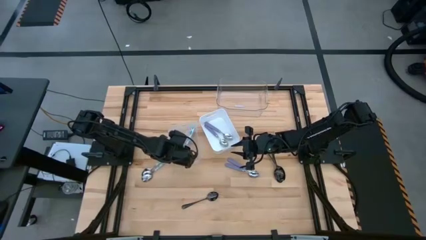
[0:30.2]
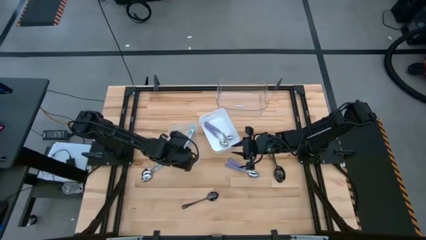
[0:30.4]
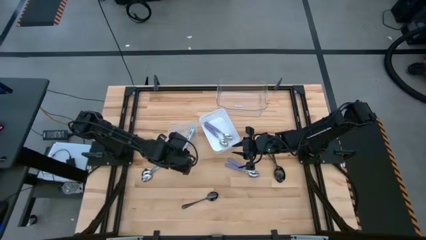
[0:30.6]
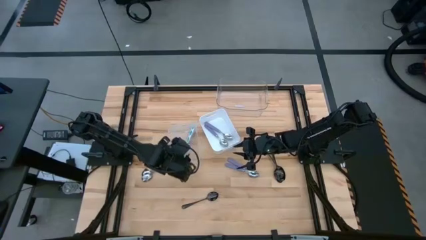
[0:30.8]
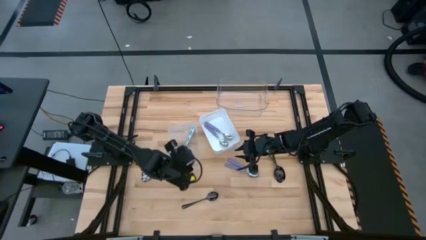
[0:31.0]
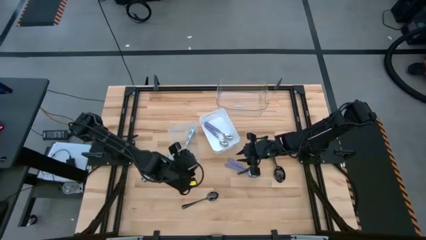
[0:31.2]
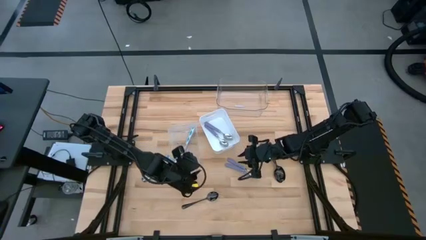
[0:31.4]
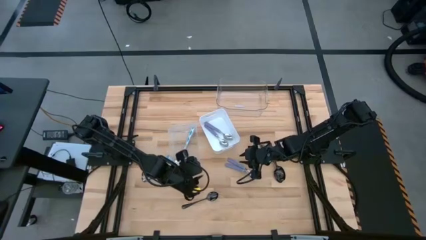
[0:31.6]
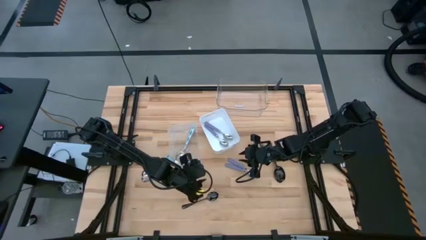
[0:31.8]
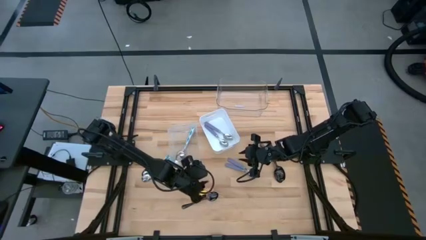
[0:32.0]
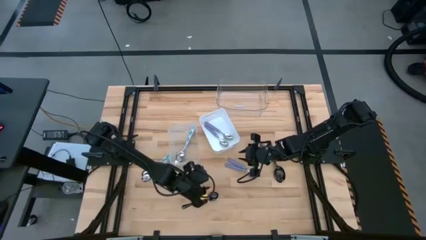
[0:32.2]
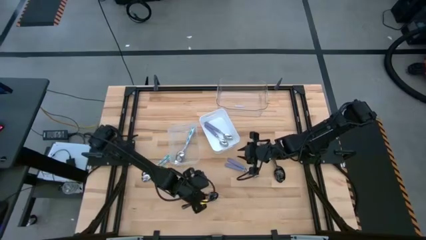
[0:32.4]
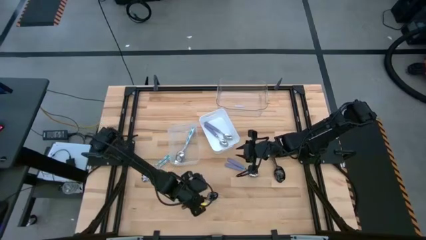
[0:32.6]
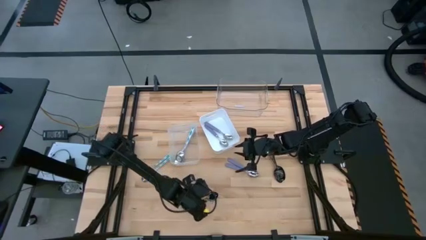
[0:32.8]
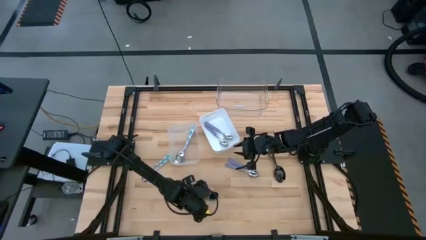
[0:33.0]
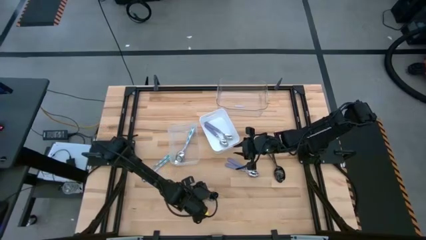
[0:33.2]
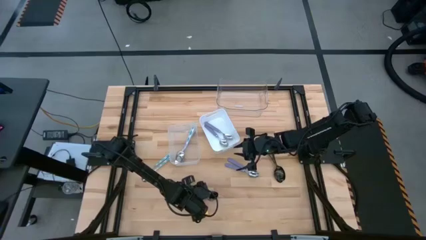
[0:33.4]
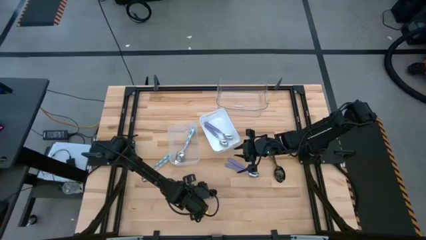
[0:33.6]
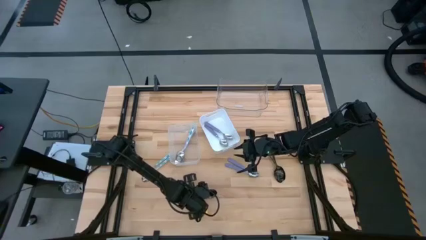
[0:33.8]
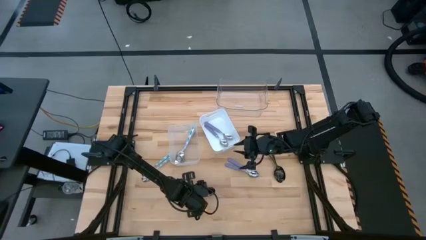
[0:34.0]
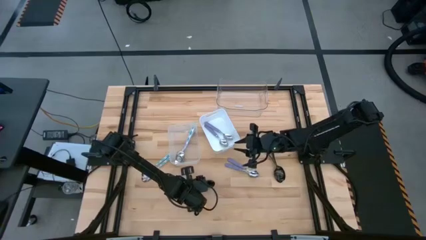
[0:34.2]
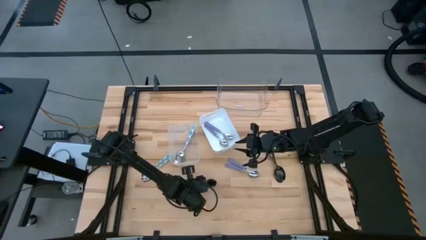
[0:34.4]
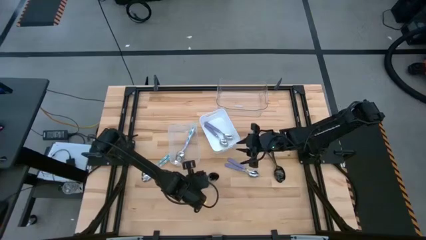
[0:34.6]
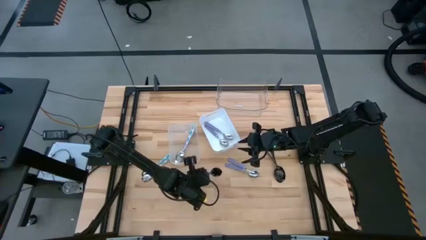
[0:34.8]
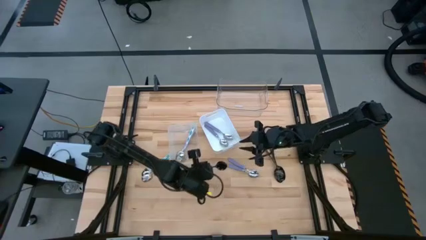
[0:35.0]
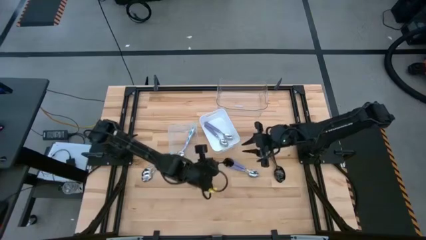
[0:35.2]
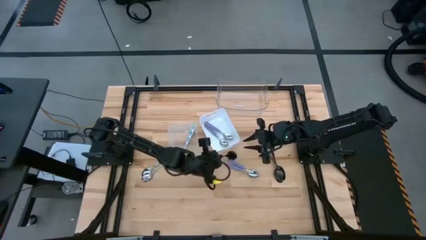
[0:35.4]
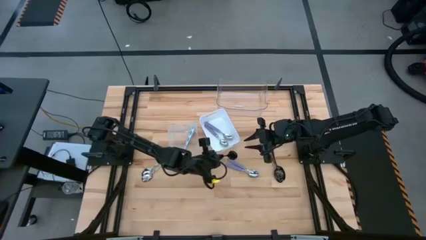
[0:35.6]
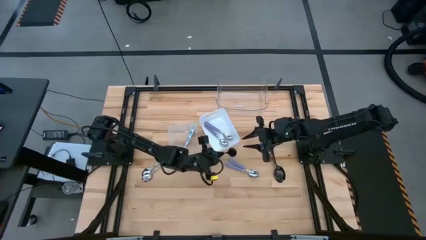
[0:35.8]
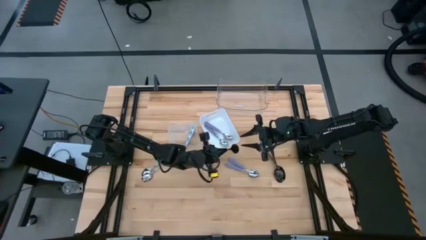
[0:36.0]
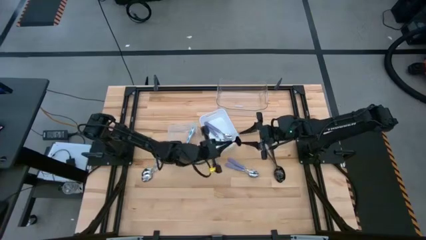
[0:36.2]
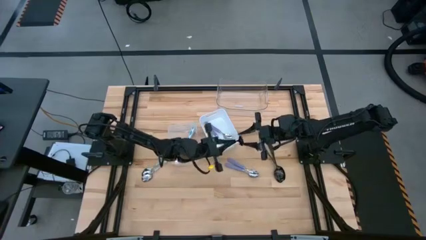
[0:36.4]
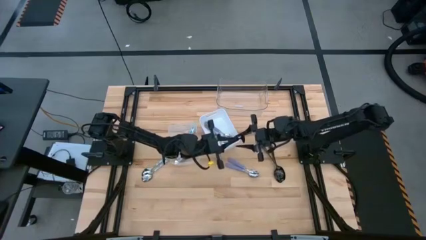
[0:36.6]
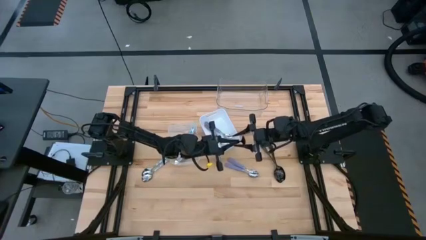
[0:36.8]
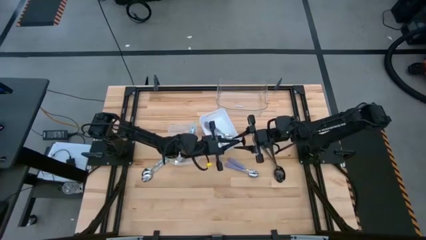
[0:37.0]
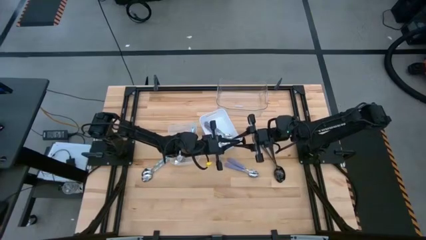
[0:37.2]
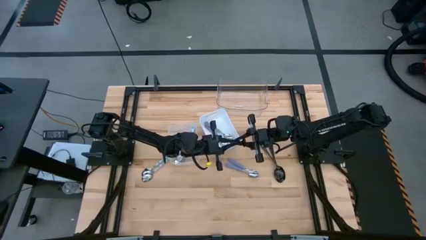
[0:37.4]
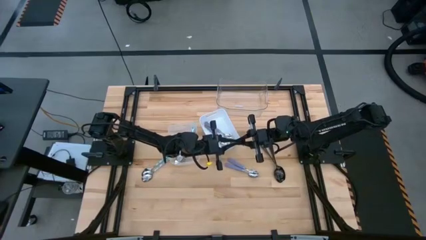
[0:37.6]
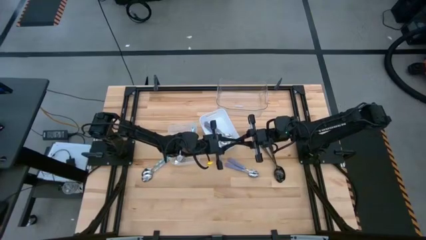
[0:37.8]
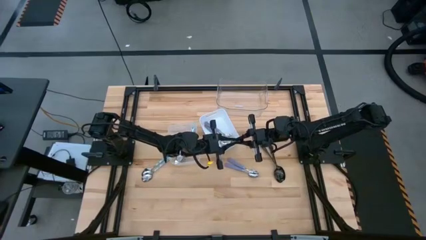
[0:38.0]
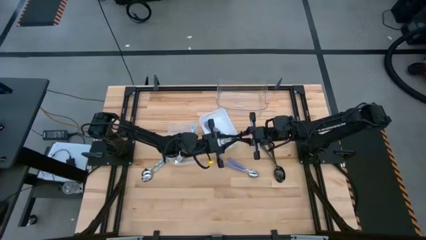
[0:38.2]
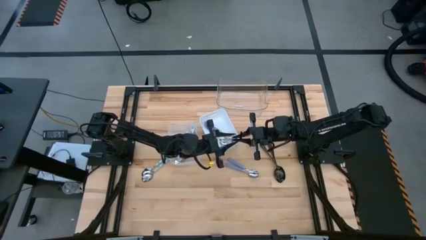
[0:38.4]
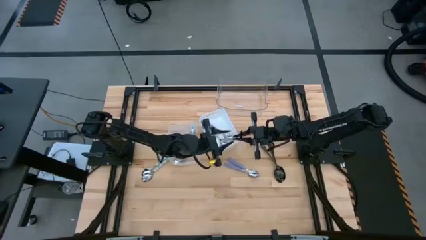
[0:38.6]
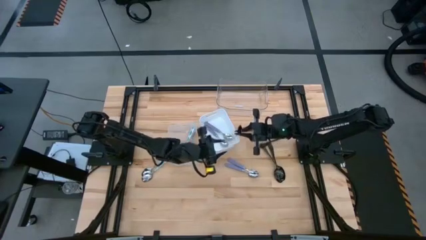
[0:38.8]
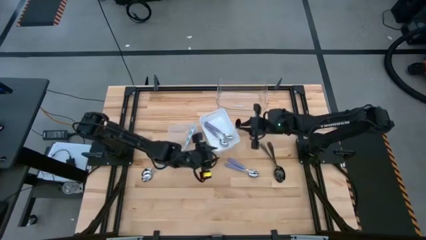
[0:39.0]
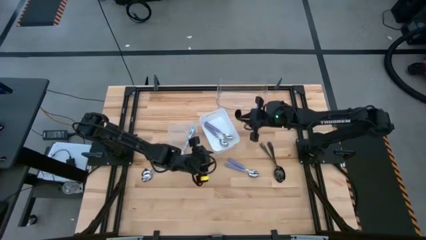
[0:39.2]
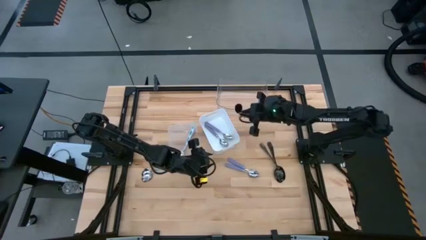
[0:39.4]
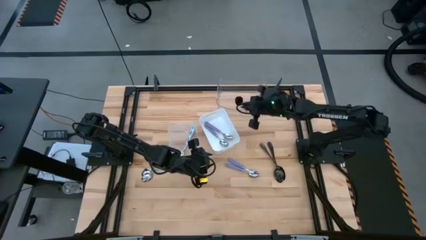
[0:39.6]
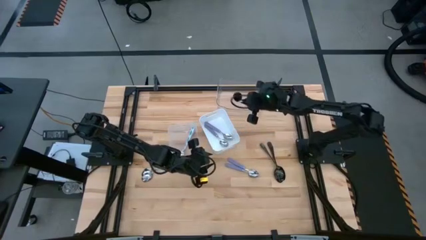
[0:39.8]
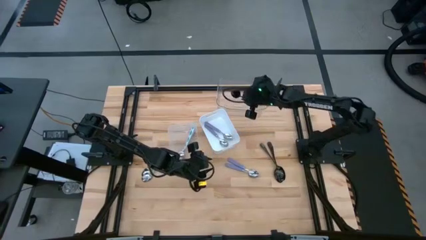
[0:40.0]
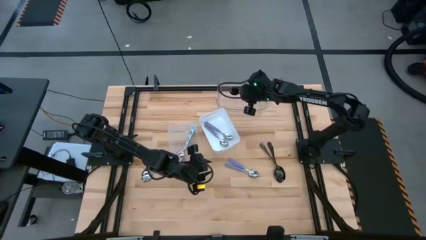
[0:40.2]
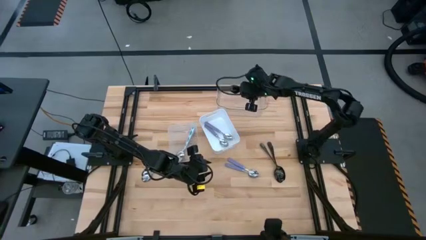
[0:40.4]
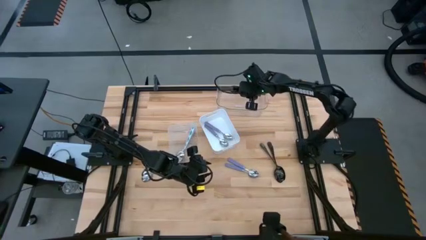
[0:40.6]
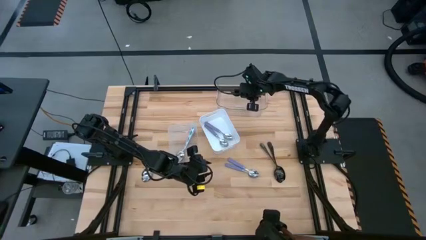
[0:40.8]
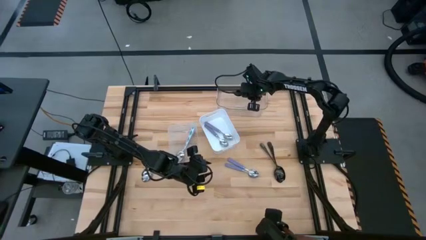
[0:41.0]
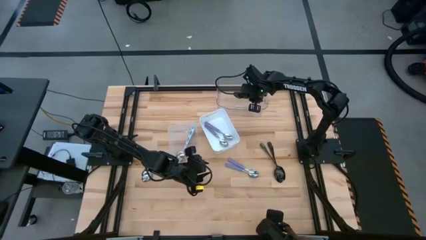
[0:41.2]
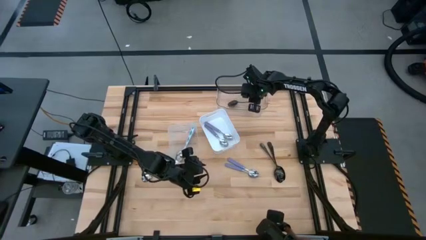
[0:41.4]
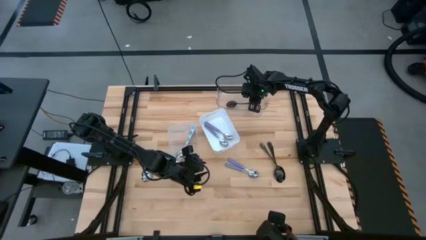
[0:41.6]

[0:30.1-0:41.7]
Task: Sort silverware by color (type)
Put the black spoon into the top transparent bin
